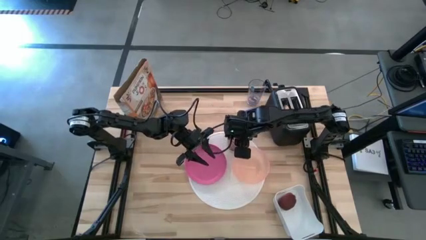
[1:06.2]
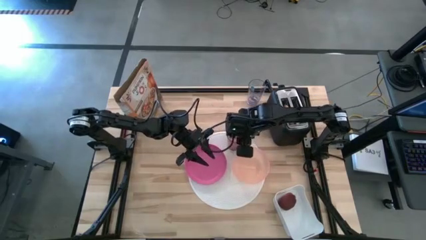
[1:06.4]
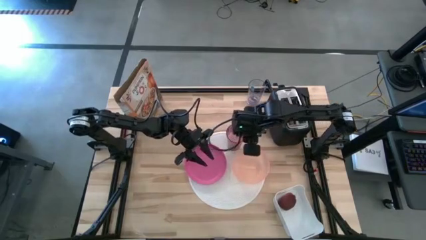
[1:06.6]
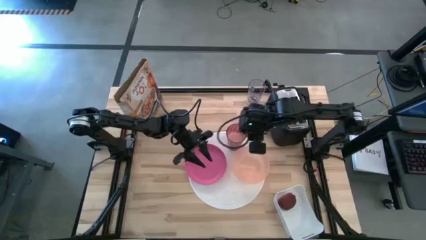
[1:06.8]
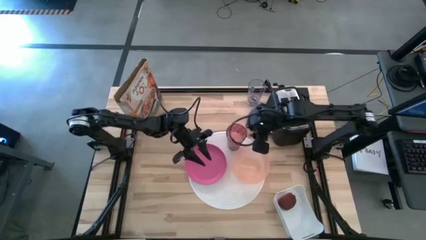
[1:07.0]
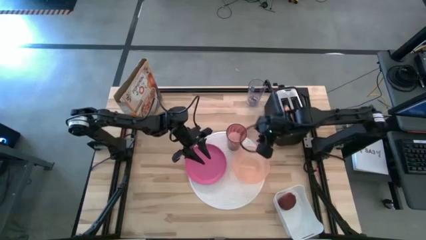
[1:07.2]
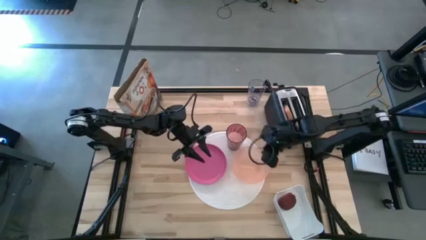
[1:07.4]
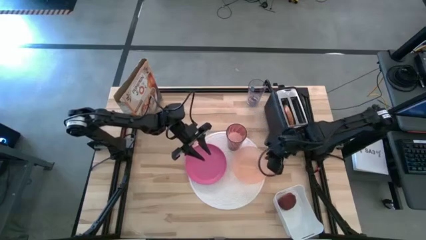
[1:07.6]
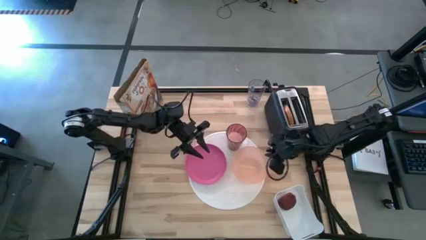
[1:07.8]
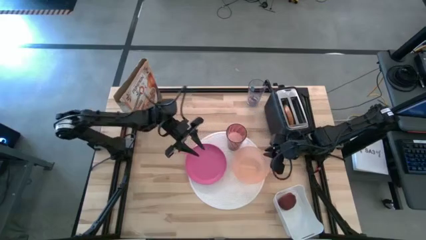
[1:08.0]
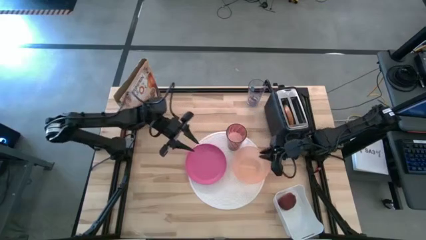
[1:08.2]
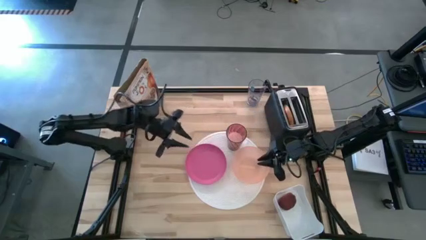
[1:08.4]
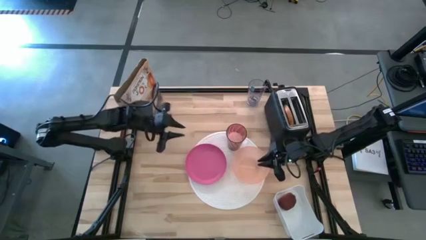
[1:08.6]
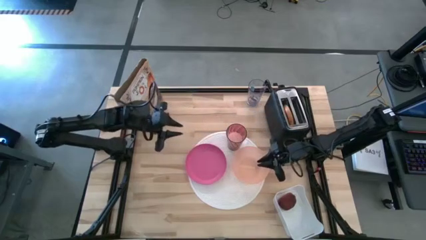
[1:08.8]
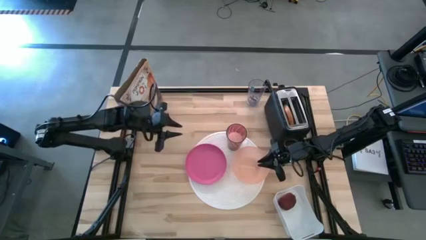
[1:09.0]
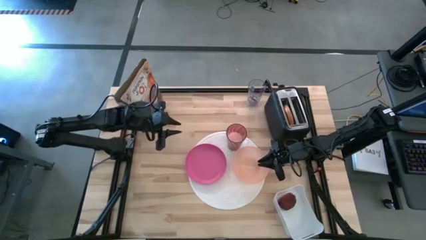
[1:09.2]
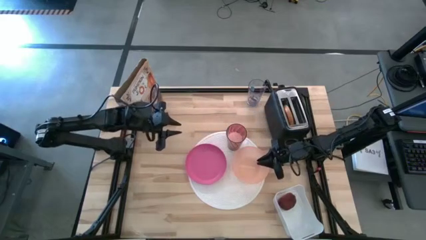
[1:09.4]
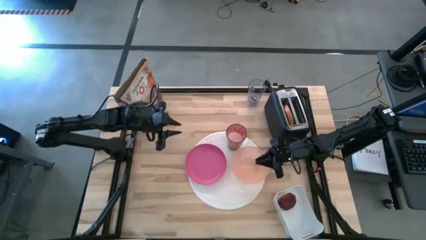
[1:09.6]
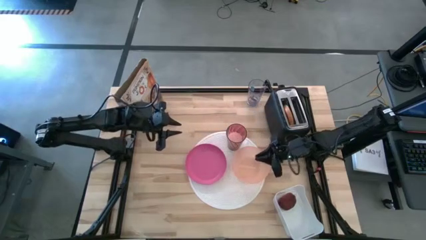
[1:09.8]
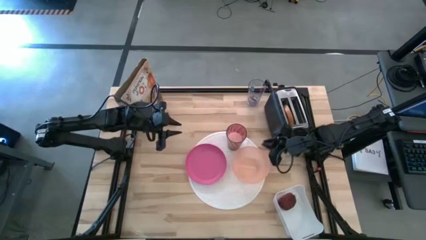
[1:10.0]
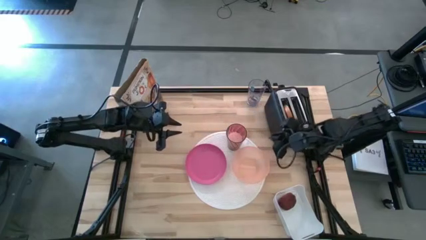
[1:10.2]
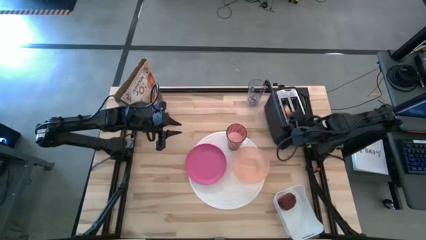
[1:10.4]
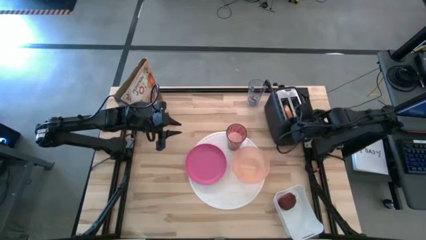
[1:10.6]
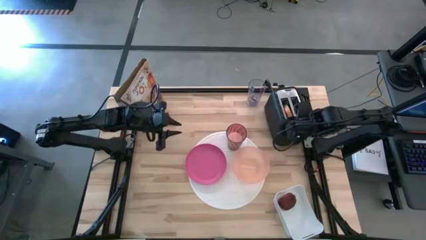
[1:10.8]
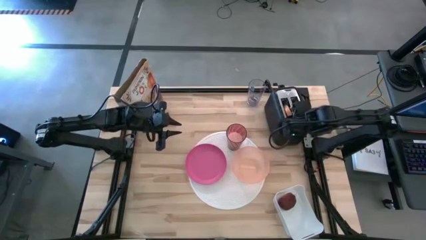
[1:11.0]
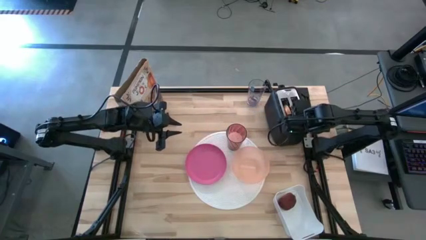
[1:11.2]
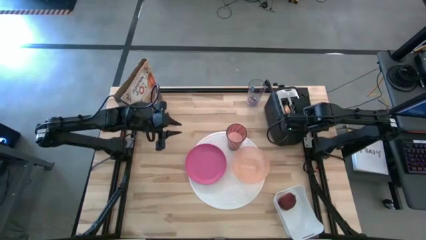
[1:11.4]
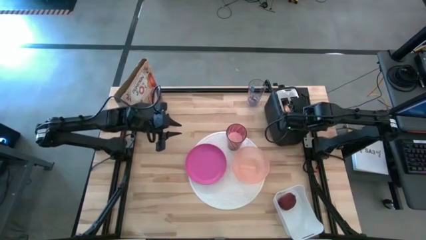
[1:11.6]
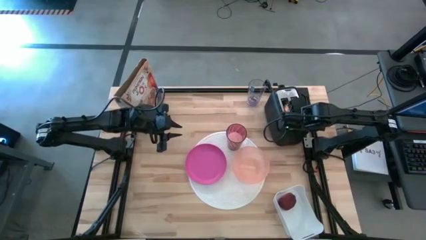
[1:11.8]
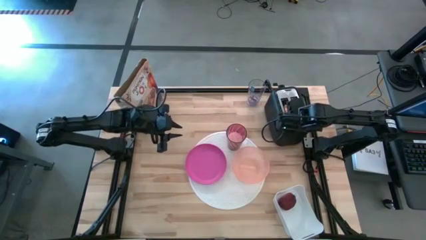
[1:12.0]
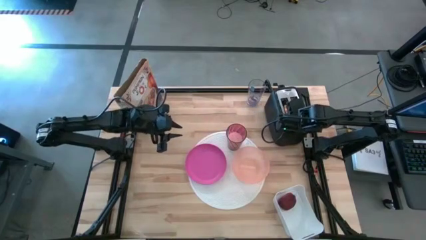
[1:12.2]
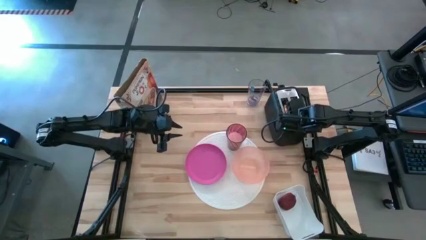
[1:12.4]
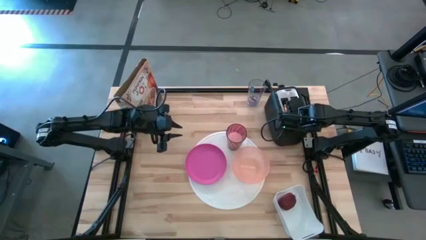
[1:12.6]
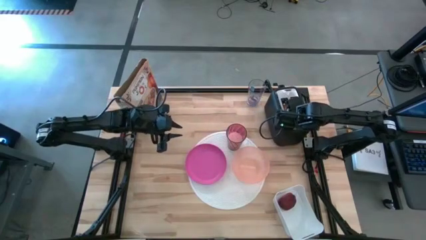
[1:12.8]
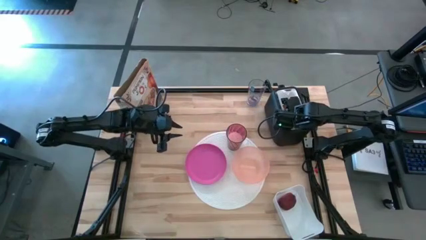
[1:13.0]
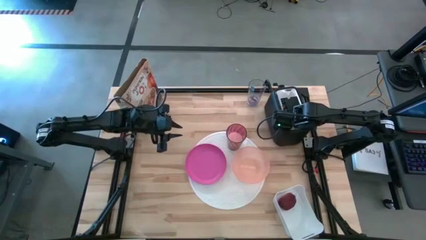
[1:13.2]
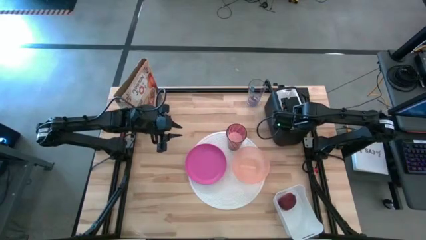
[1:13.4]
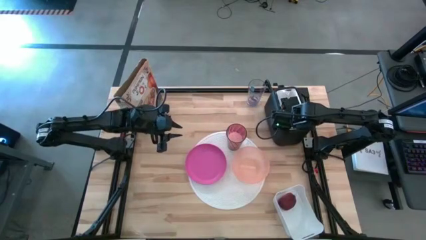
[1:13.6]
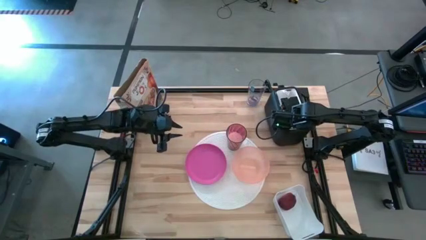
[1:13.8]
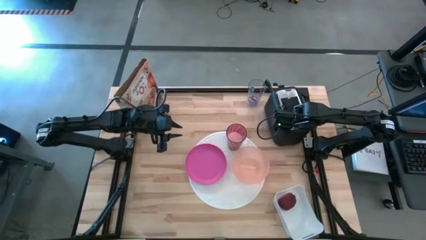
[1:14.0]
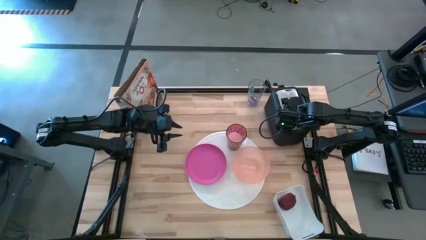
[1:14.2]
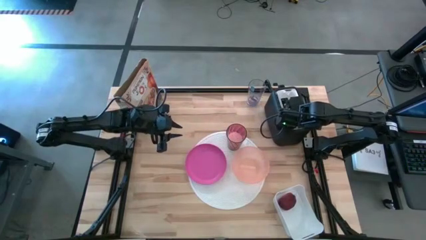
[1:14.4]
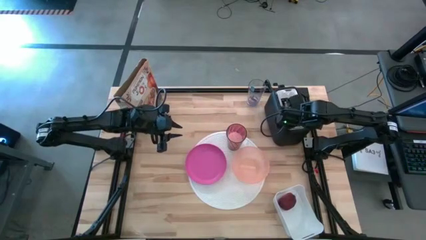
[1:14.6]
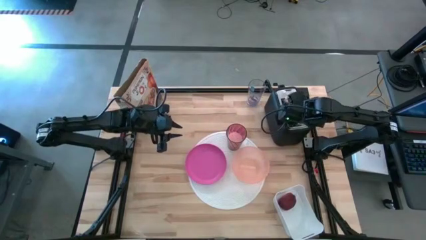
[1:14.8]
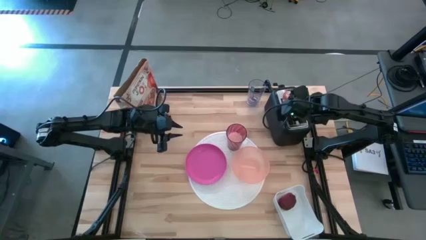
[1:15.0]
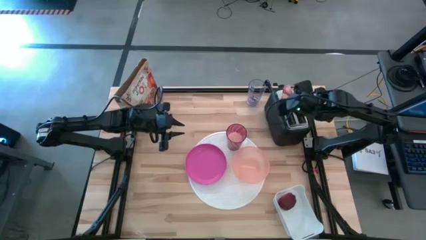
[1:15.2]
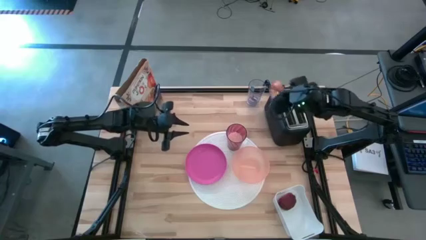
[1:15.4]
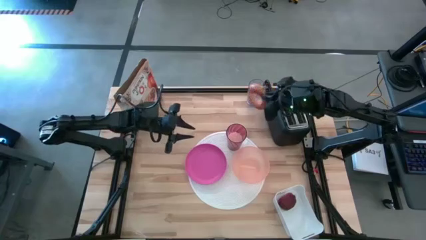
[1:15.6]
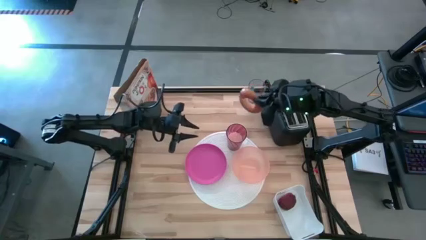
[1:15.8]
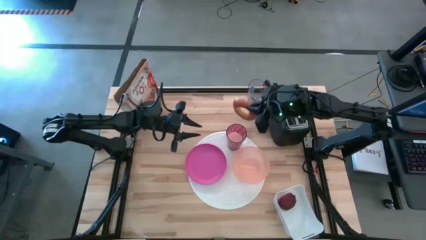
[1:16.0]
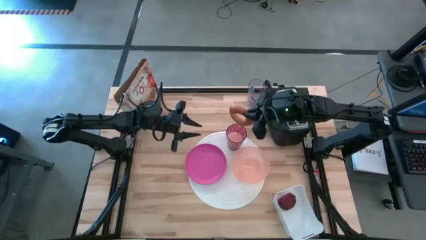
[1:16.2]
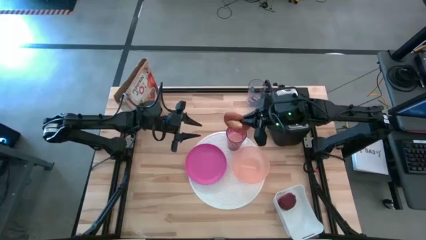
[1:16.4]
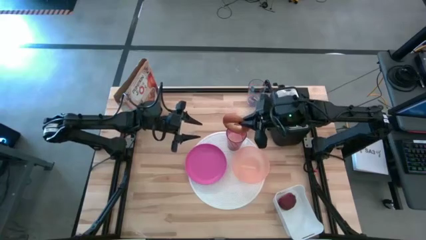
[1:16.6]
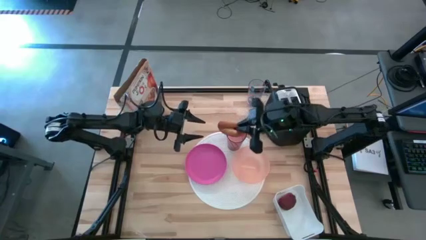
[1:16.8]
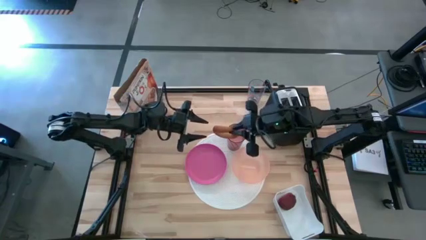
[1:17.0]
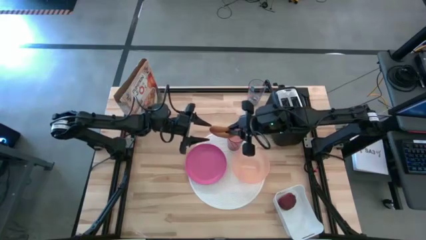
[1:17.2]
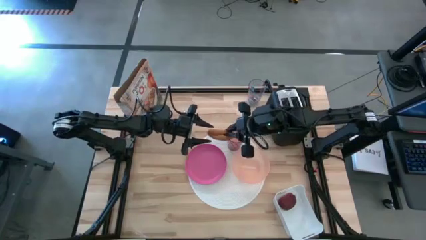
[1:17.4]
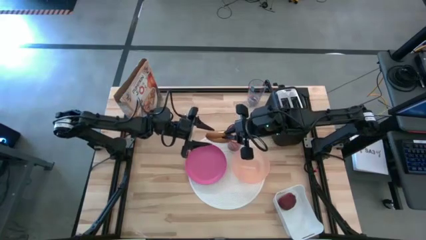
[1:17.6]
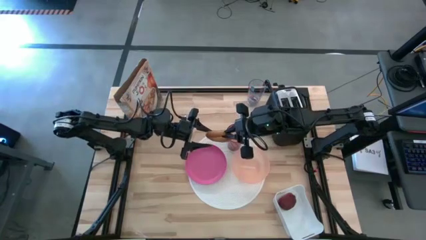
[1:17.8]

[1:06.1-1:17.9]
Task: Arrange a breakfast setting
Put the toasted bread on the pink plate
